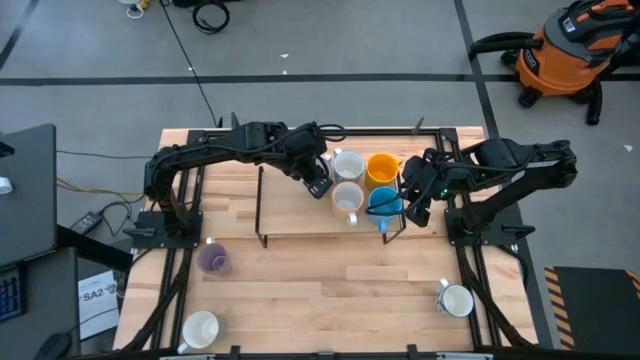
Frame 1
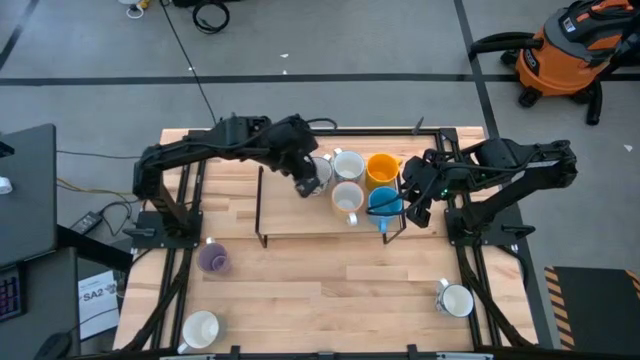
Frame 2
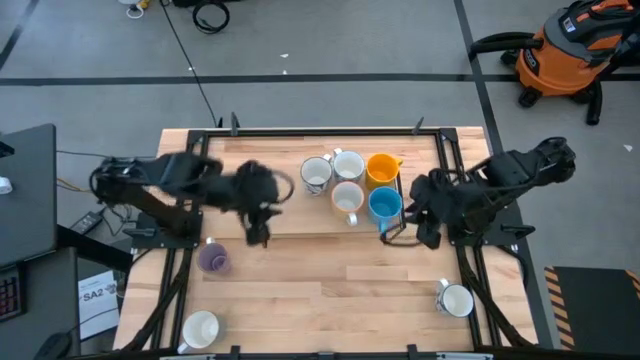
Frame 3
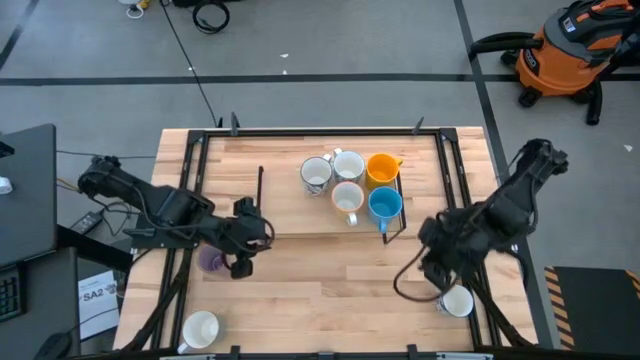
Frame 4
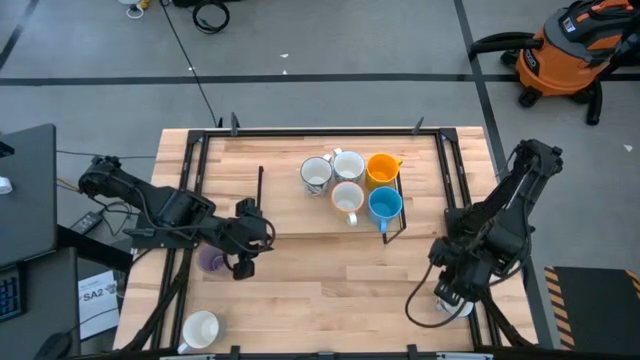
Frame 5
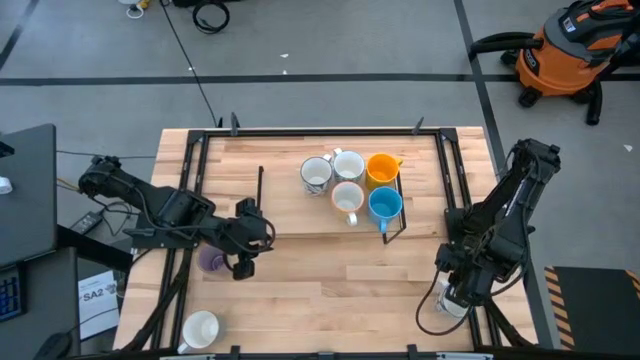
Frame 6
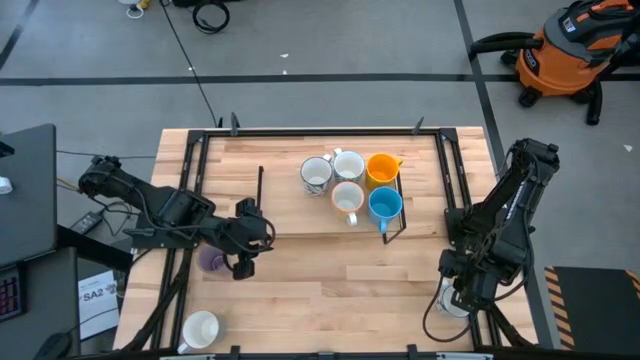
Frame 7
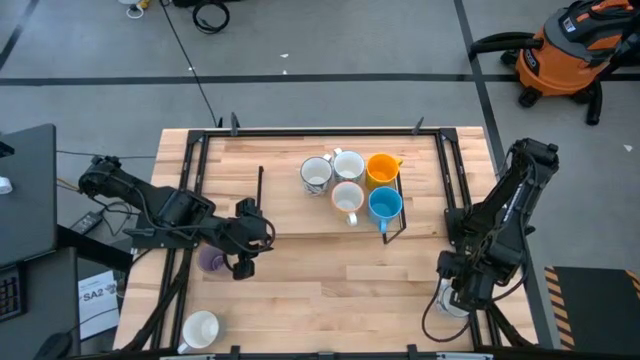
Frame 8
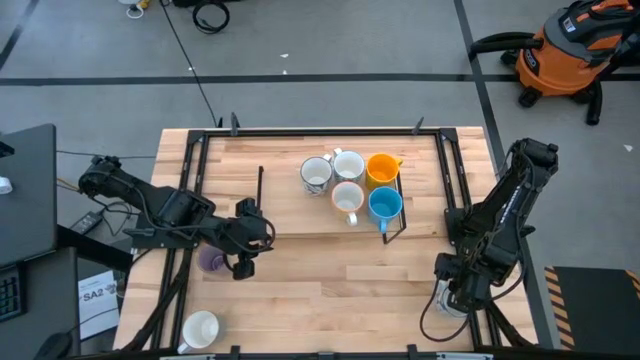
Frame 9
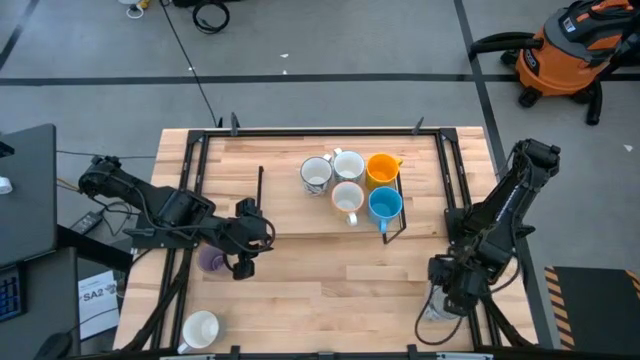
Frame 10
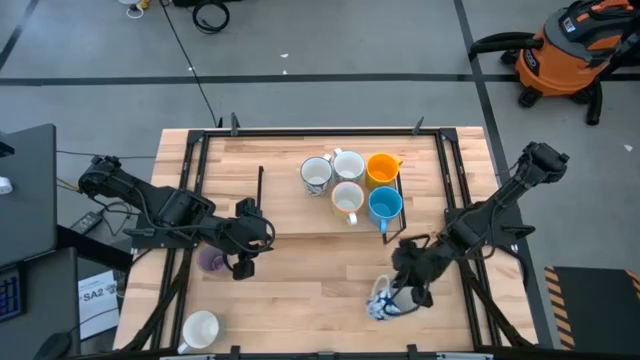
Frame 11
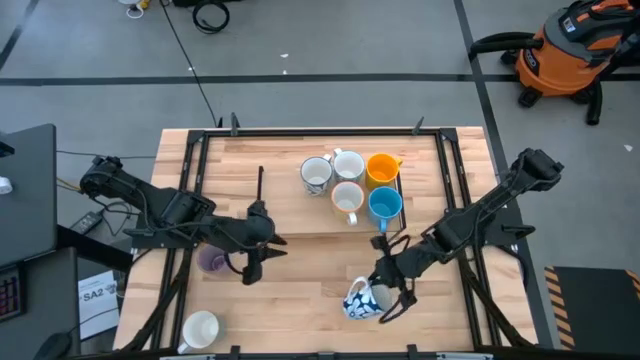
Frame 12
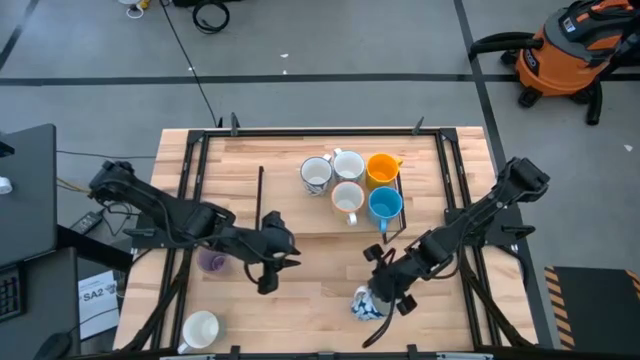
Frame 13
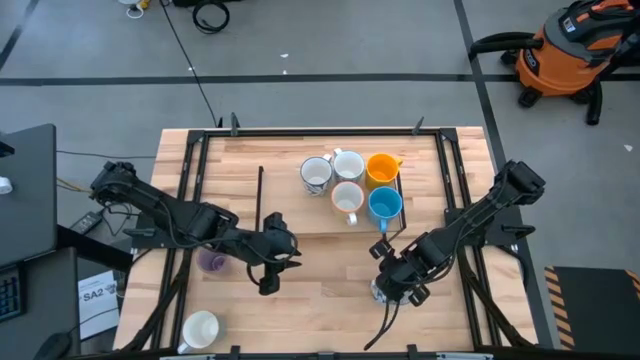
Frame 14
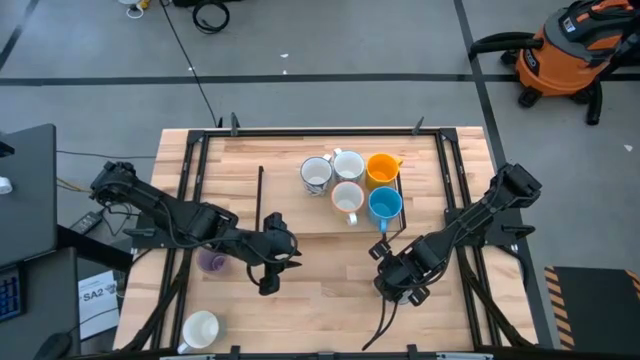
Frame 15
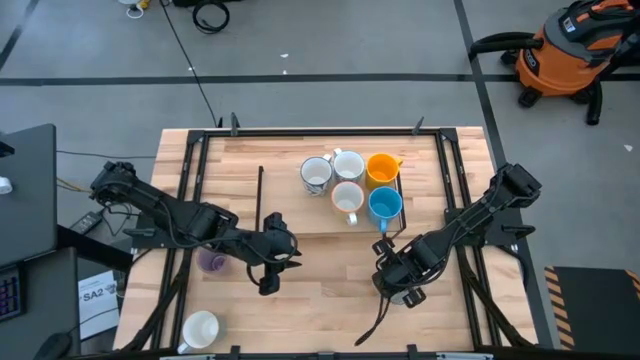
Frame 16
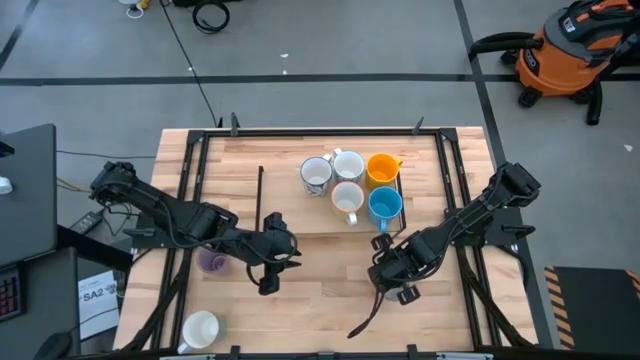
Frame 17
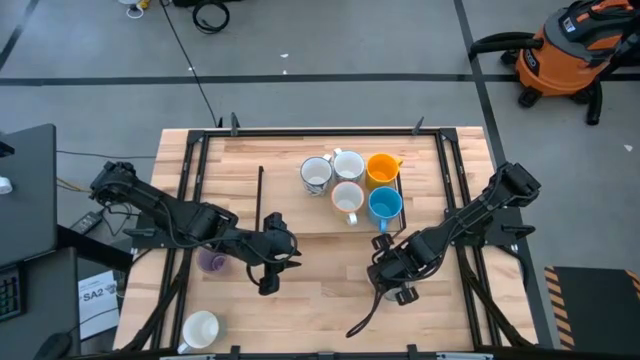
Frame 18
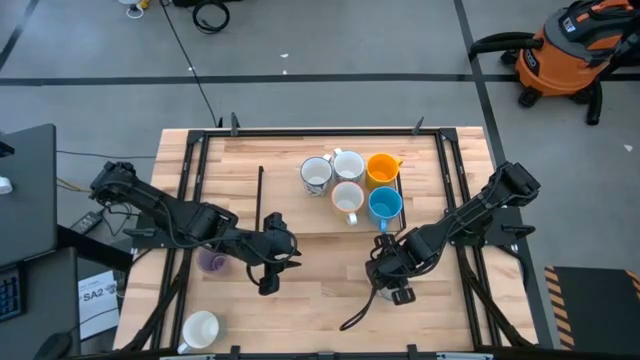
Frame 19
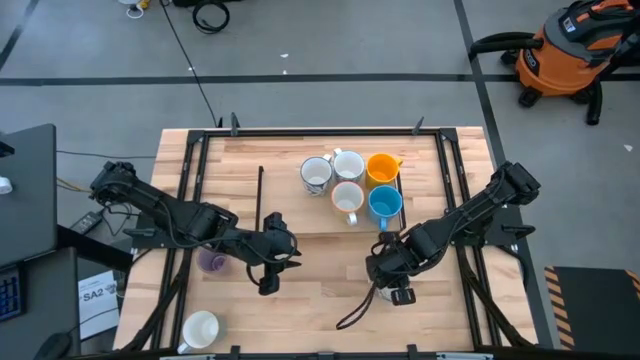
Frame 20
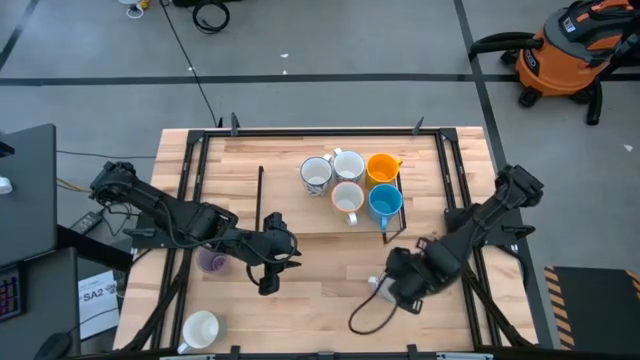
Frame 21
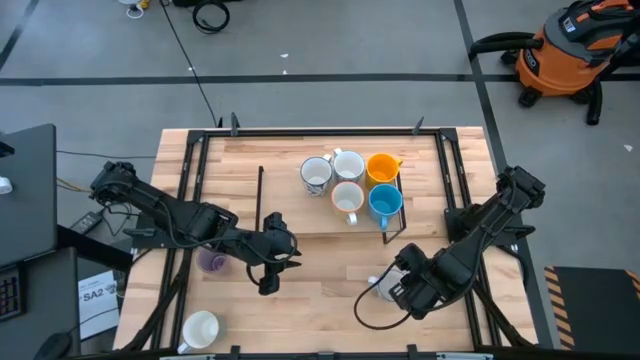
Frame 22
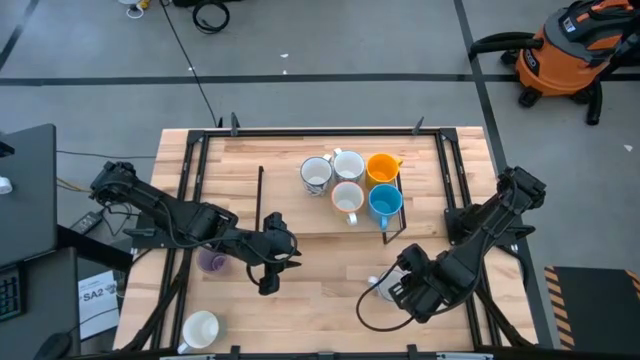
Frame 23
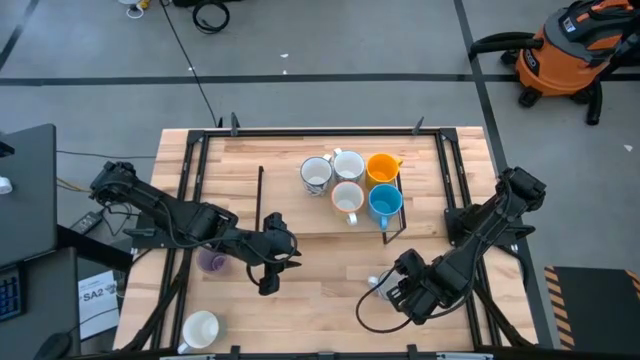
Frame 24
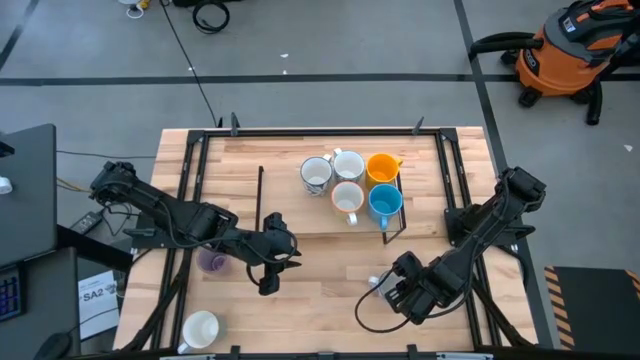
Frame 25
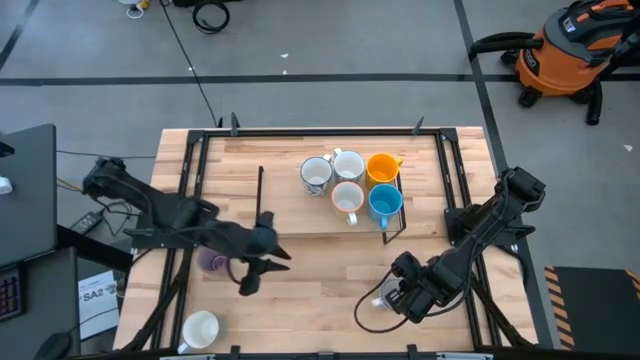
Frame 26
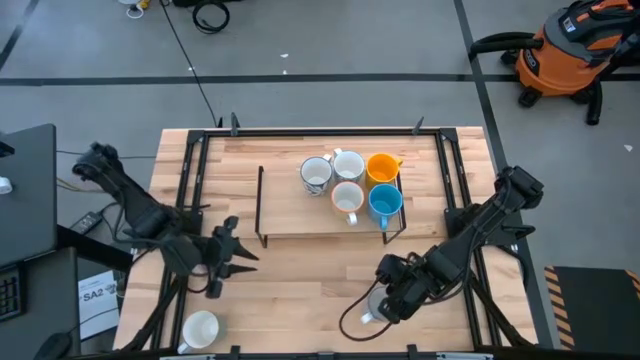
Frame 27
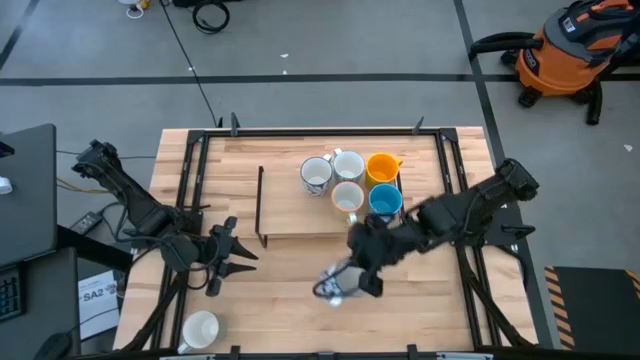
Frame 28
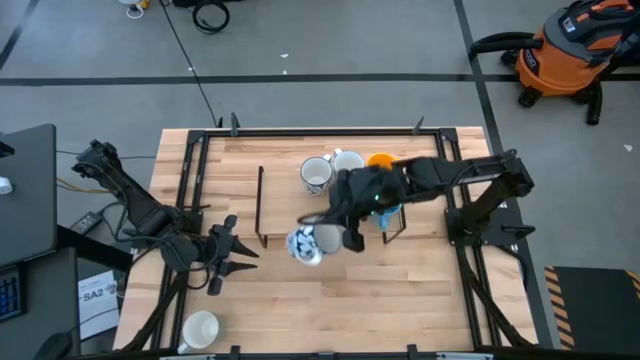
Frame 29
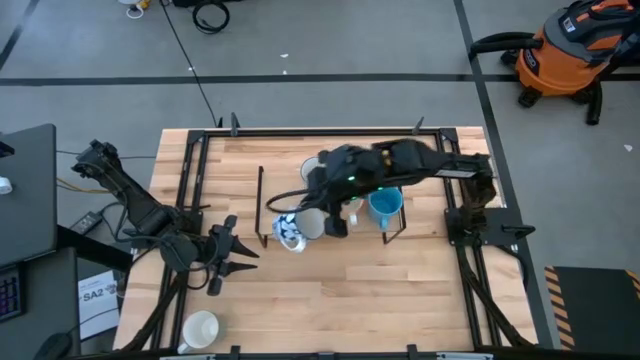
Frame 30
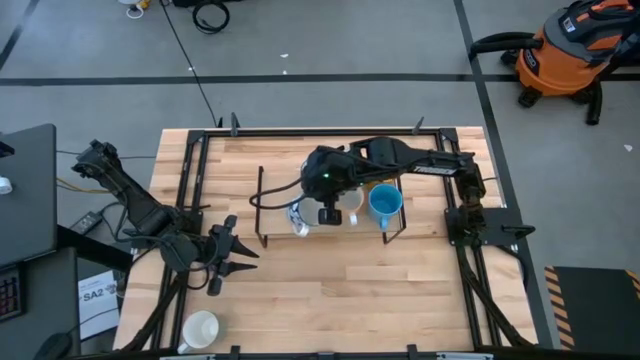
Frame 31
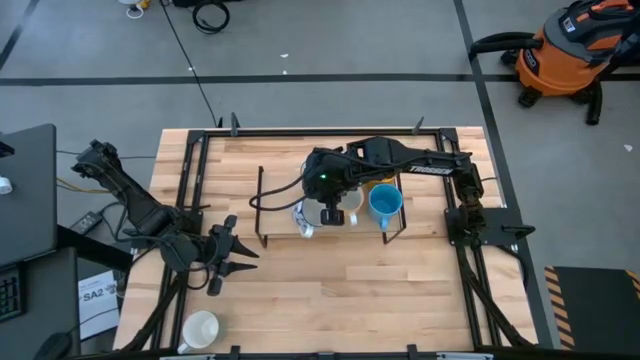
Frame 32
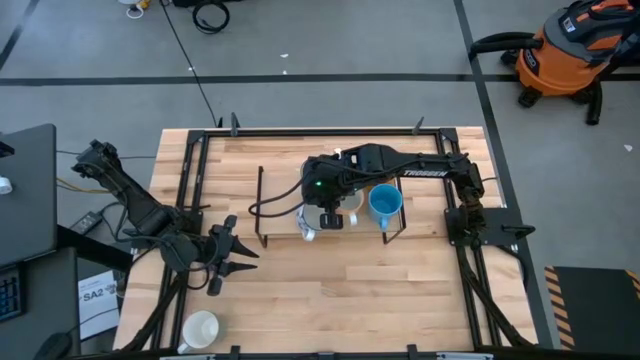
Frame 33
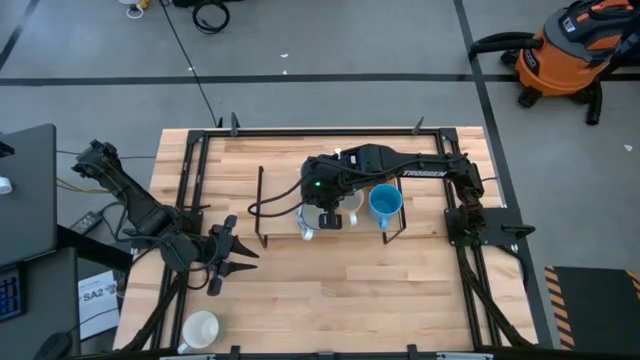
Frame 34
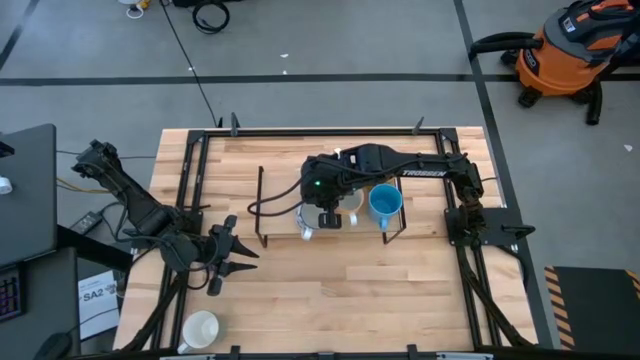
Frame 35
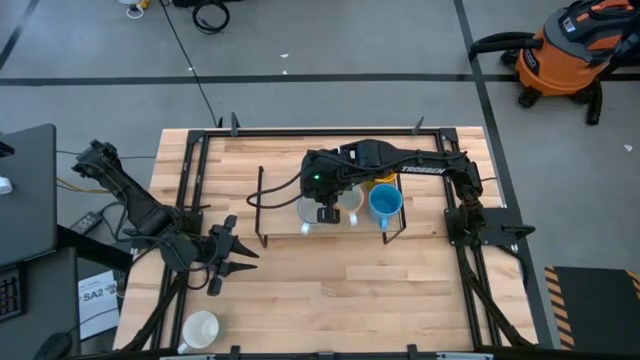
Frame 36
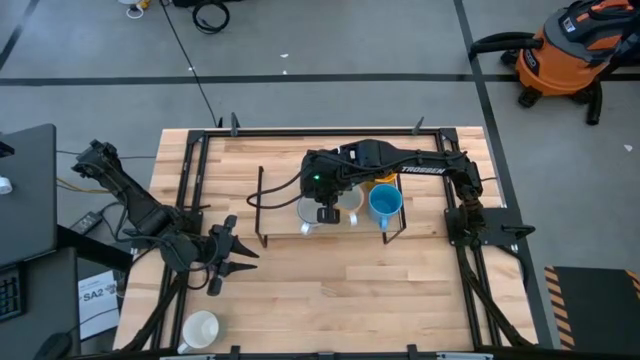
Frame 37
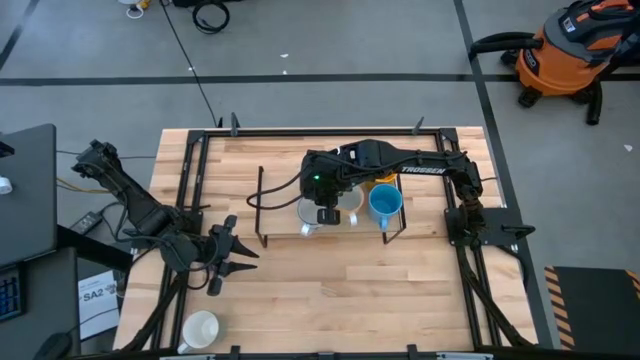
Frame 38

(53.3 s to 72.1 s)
Task: Place coffee mugs
Put the blue patterned mug on the shelf
